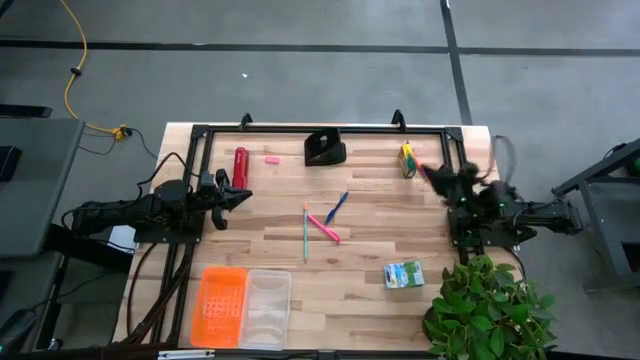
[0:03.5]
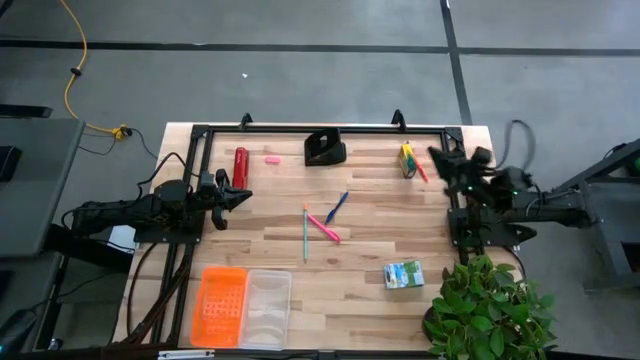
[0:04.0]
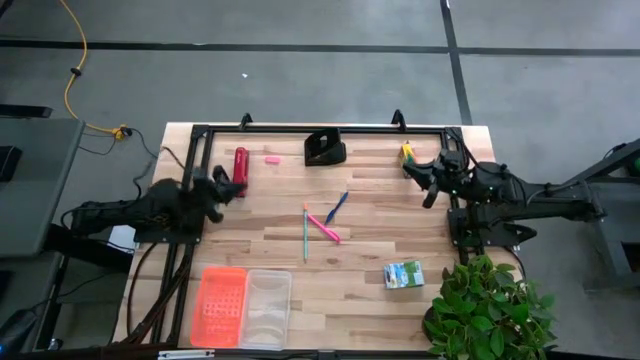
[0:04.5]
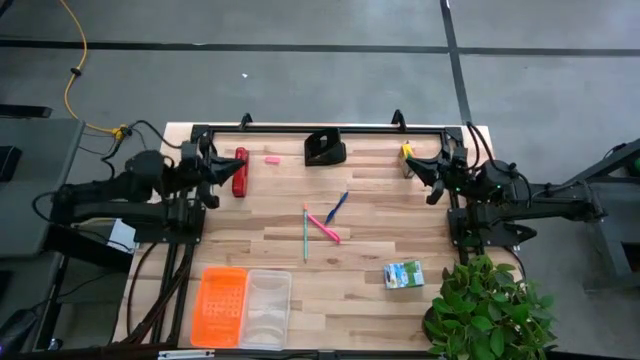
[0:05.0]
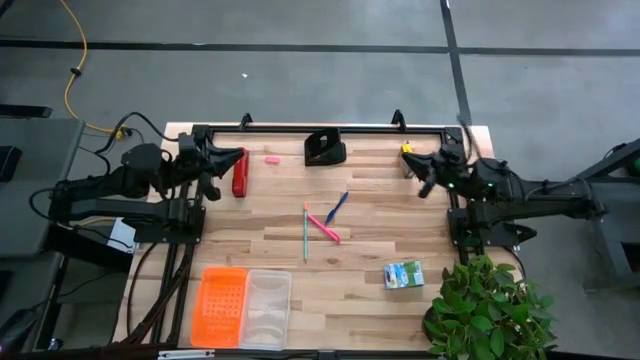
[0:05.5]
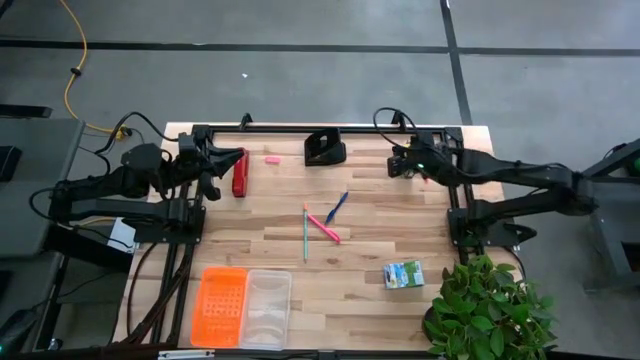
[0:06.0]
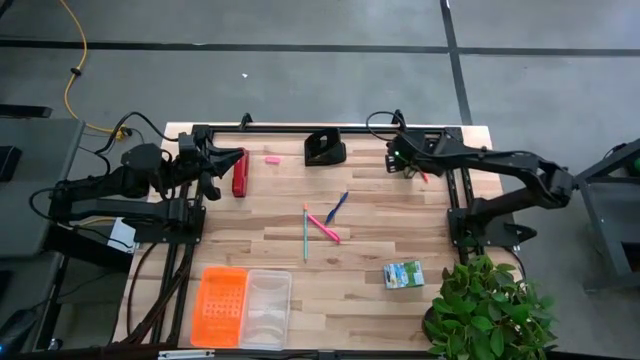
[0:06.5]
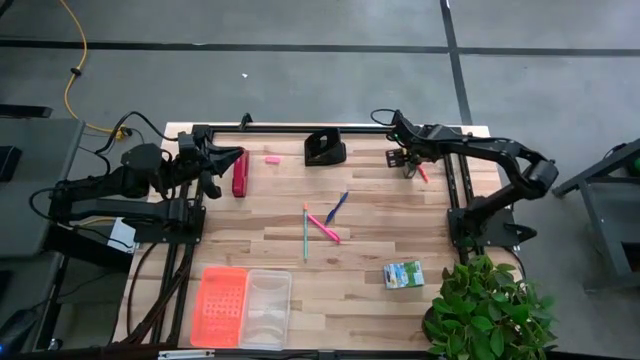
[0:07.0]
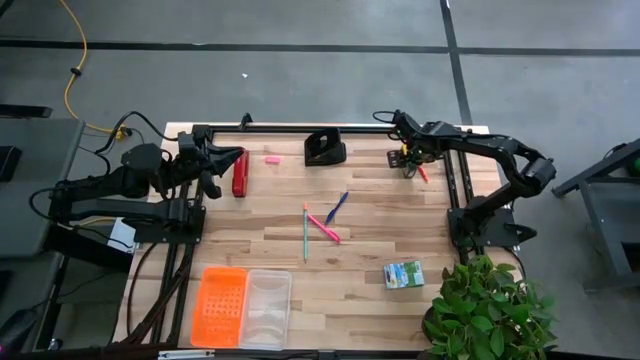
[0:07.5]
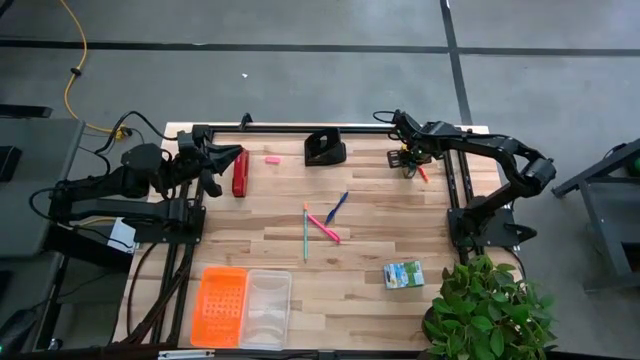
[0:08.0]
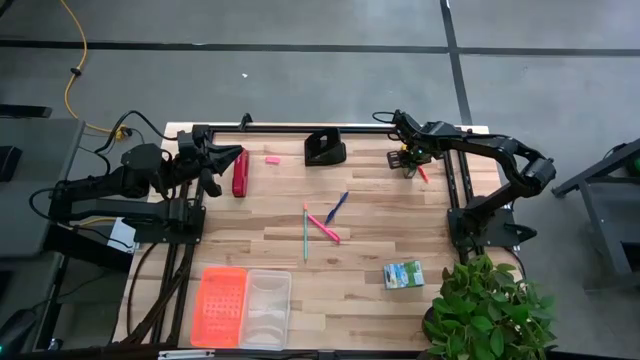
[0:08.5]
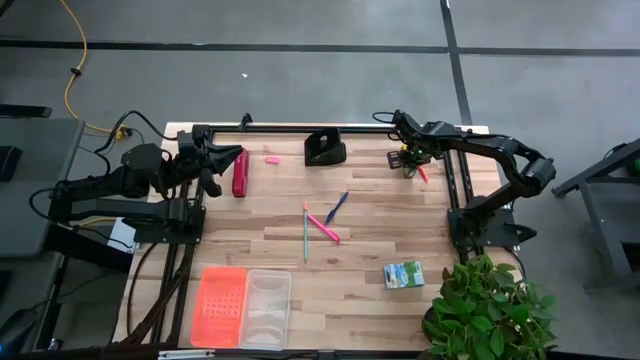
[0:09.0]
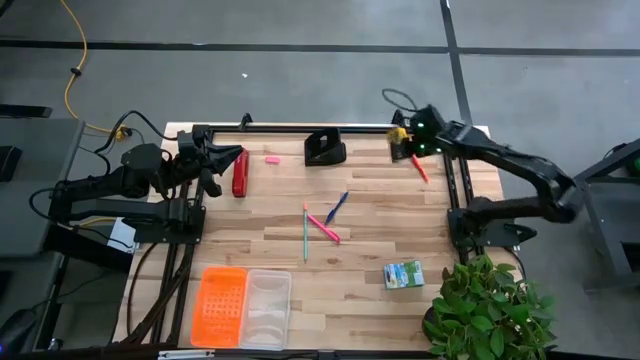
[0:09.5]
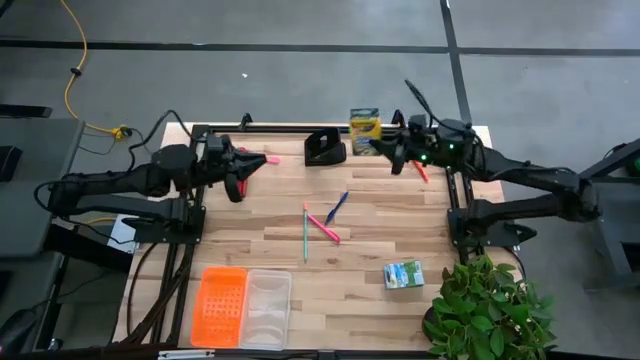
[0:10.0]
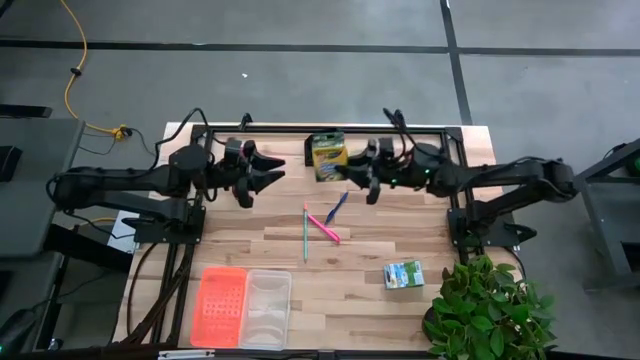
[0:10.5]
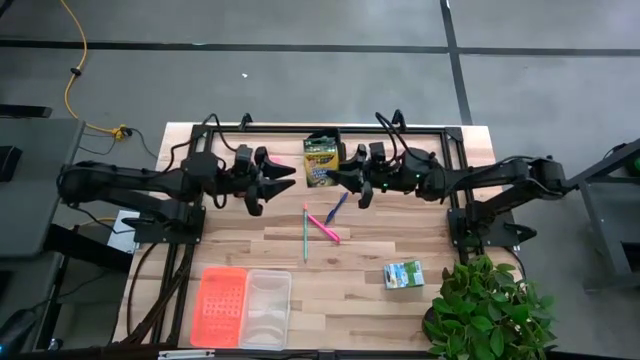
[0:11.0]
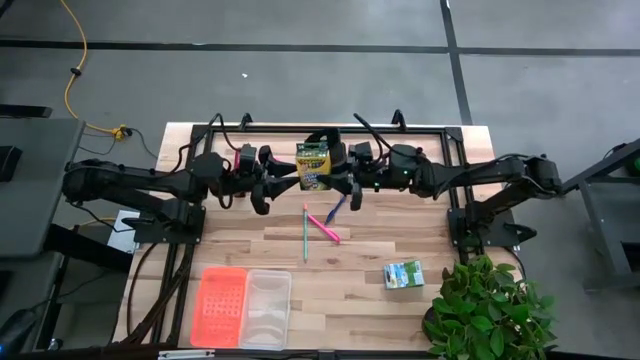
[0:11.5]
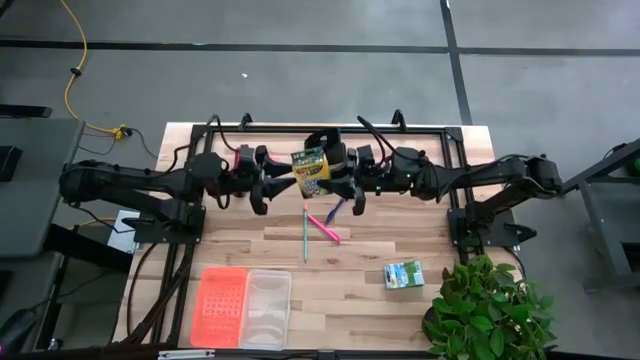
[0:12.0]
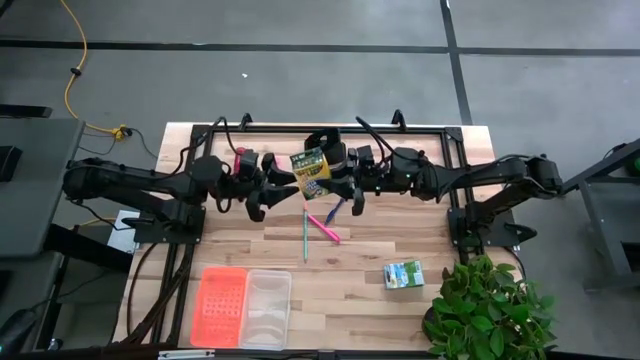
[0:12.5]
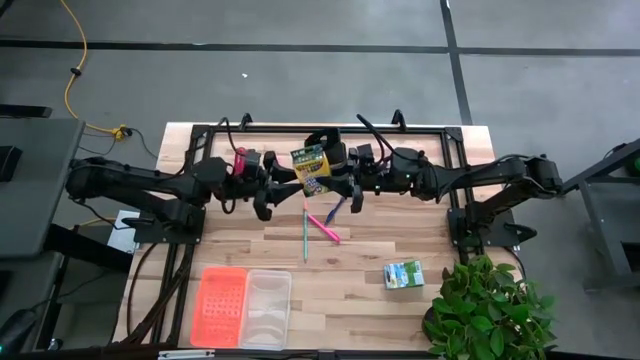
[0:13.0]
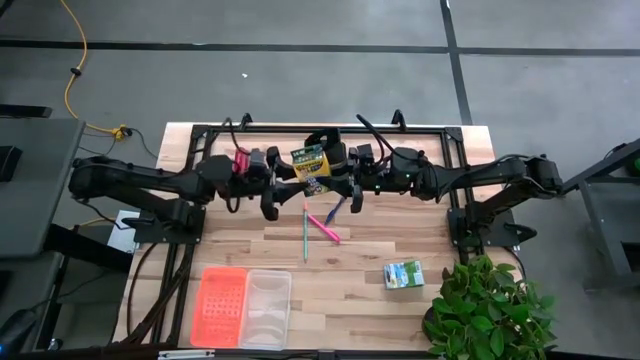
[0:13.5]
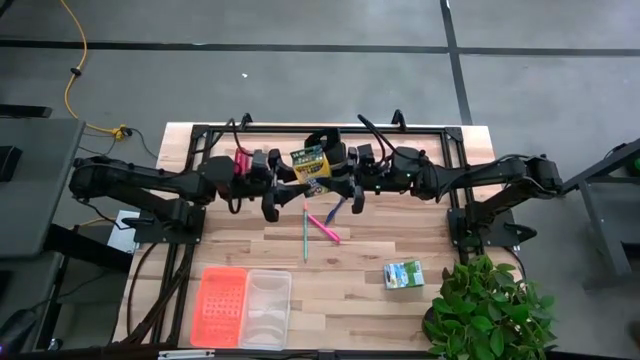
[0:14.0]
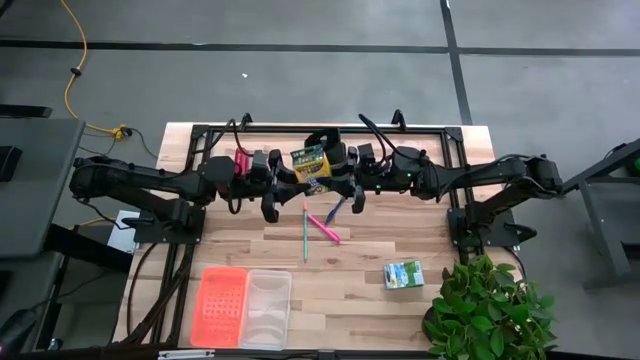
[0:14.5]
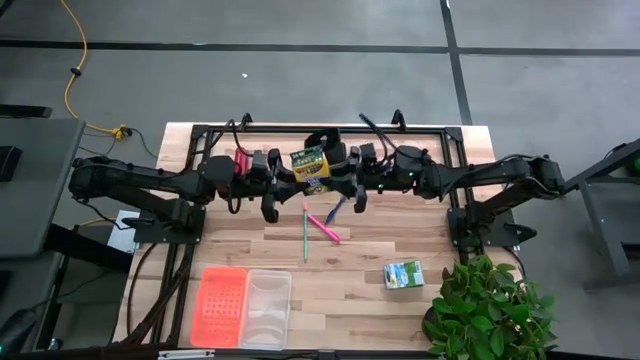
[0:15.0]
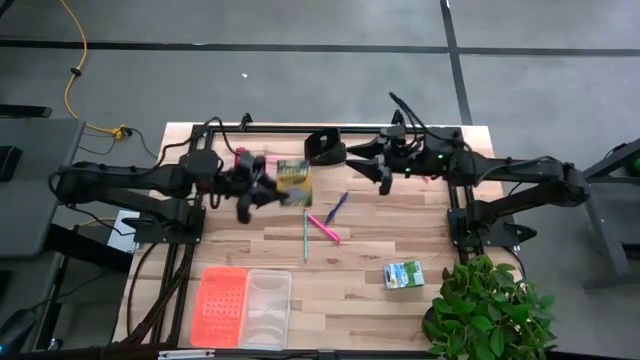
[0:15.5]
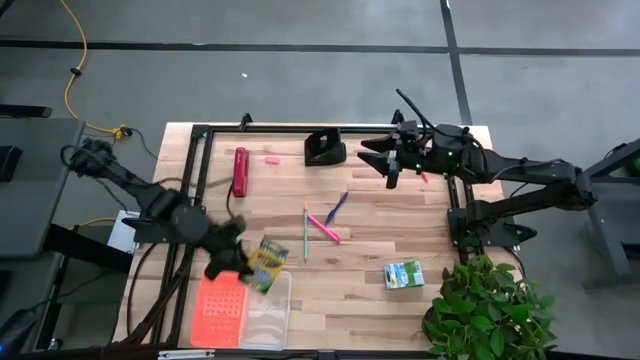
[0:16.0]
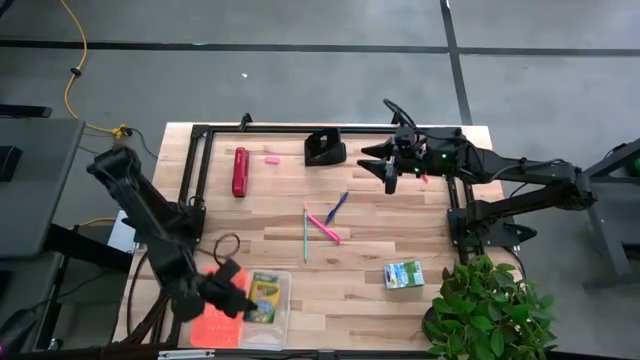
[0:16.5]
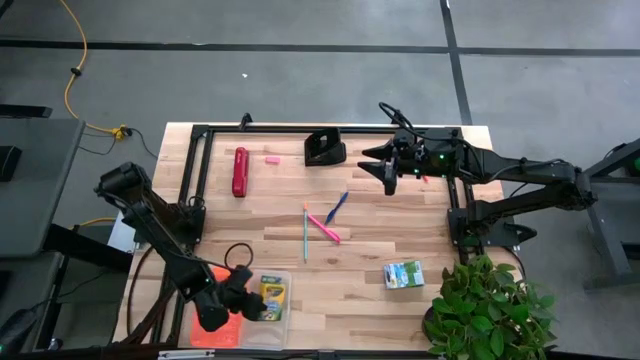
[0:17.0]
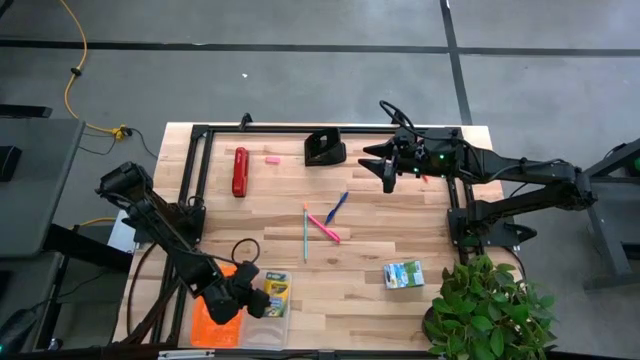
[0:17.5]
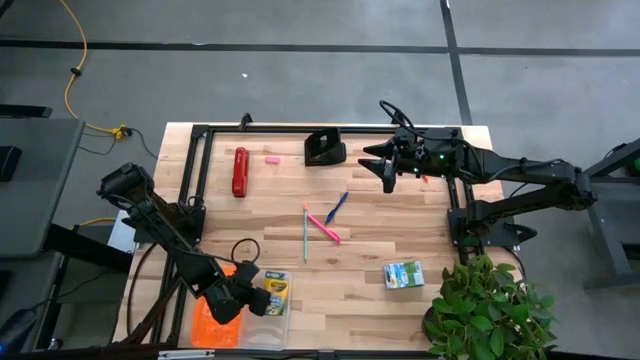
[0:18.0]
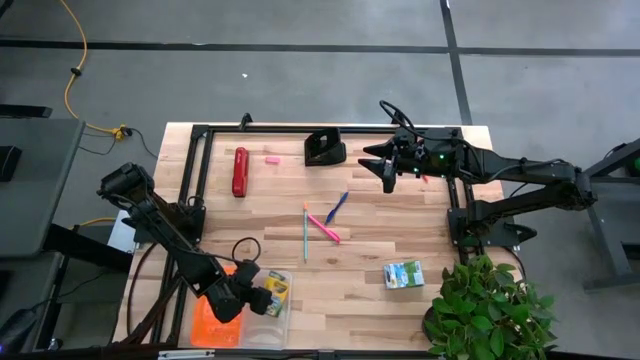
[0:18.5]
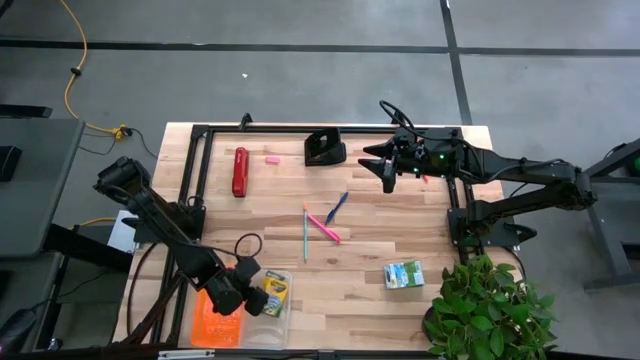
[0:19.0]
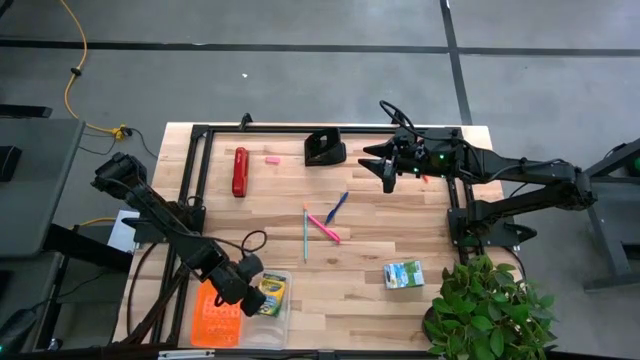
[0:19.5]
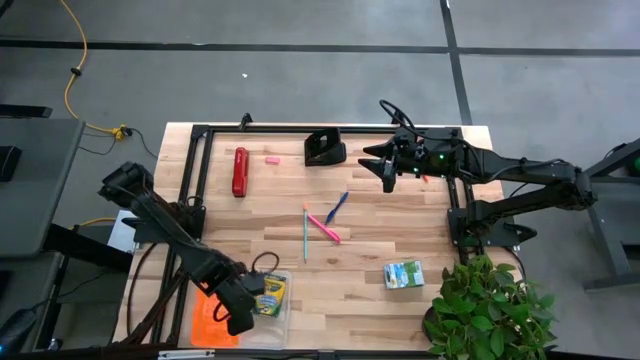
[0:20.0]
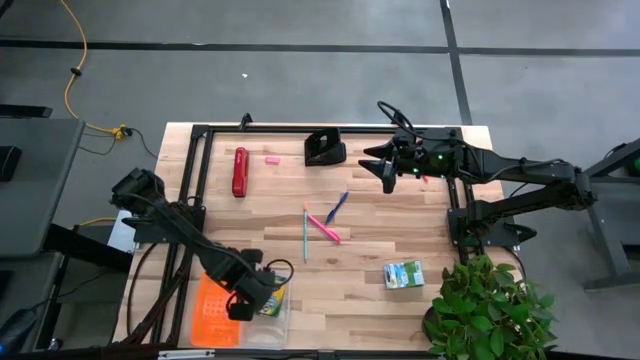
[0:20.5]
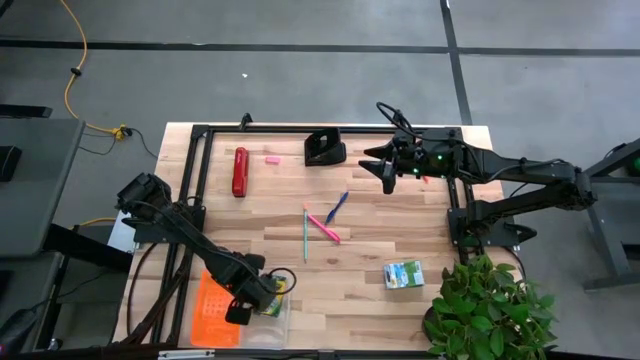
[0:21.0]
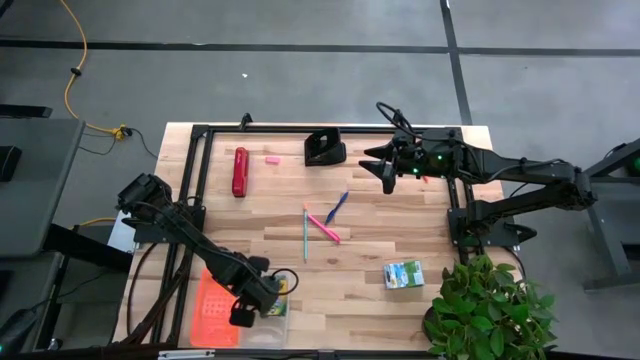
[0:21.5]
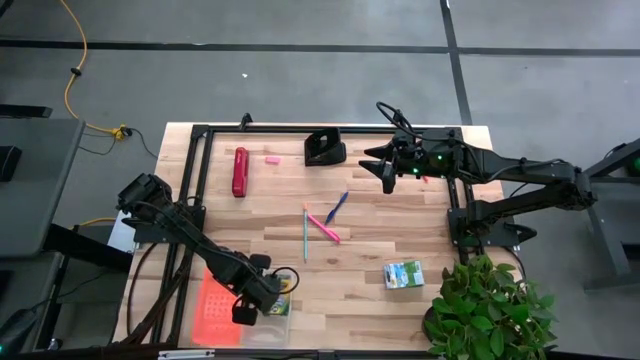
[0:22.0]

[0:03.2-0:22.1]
Task: Pack school essentials
Put the top crayon box into the supply box
